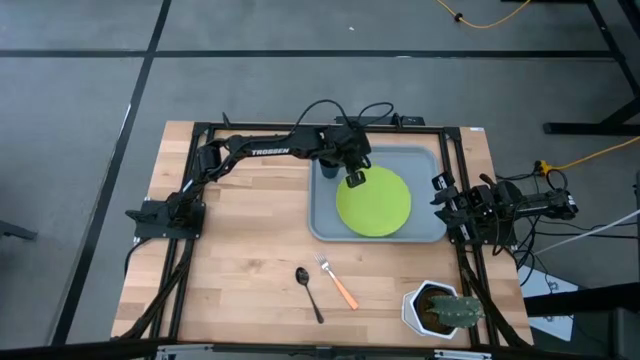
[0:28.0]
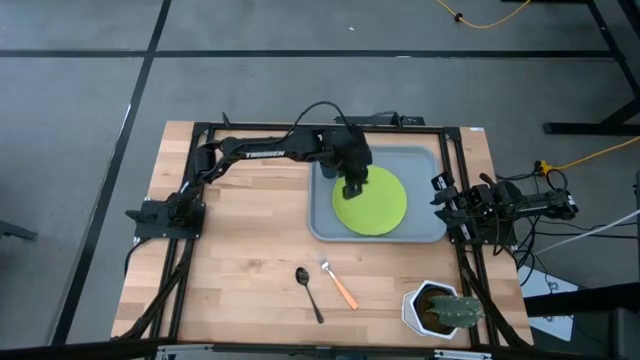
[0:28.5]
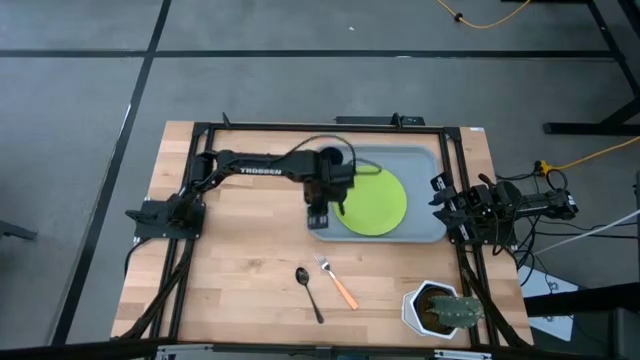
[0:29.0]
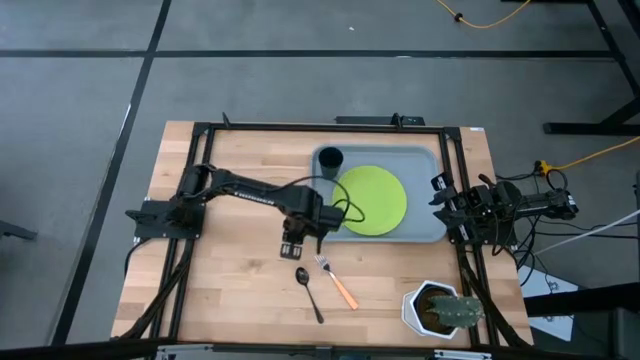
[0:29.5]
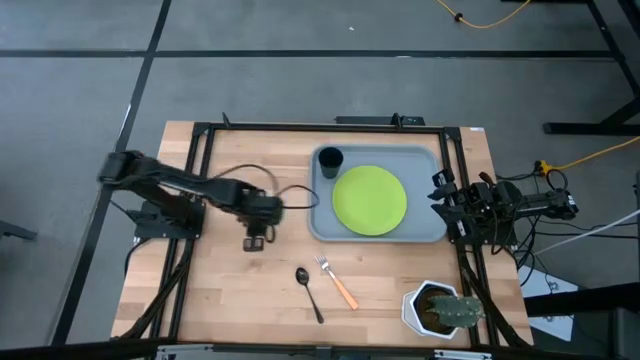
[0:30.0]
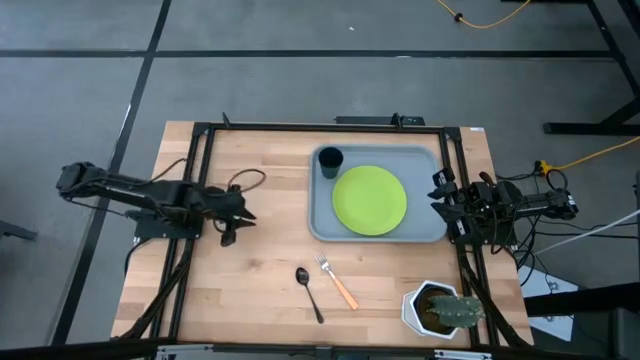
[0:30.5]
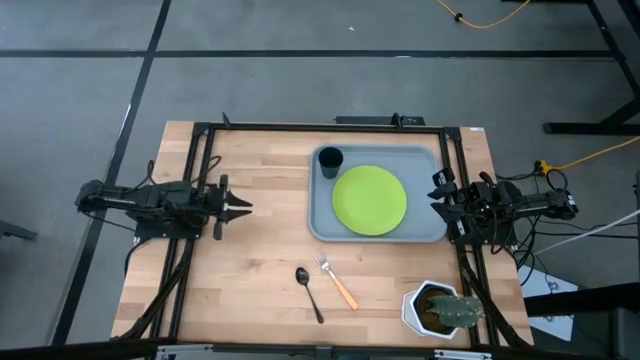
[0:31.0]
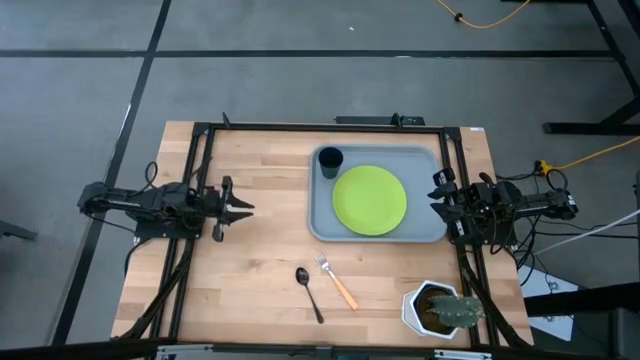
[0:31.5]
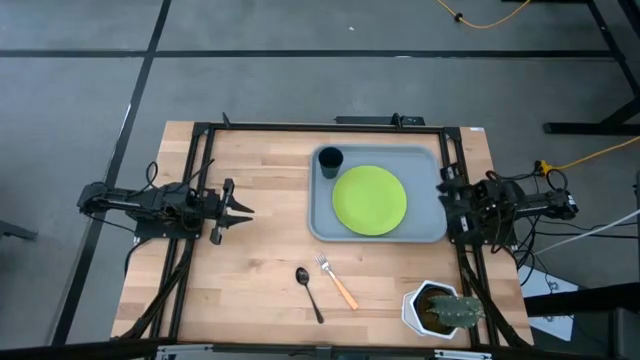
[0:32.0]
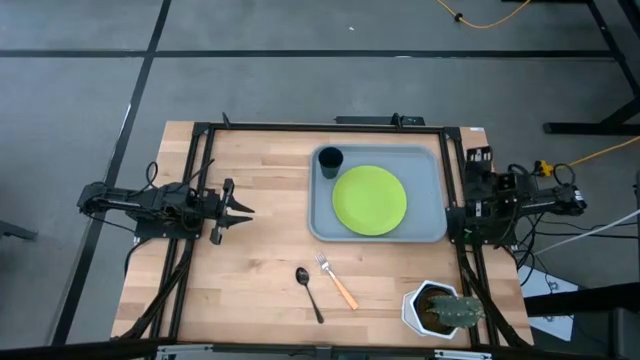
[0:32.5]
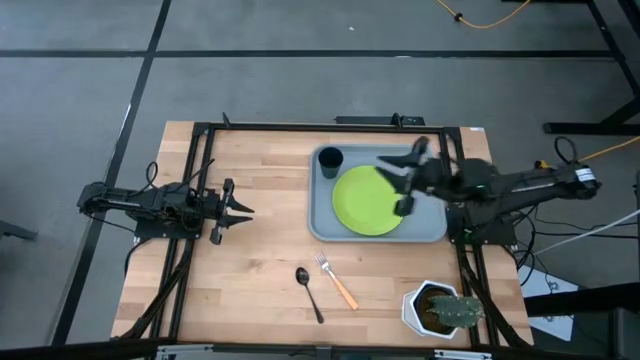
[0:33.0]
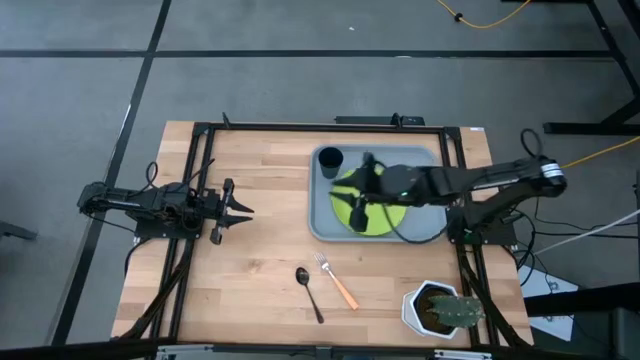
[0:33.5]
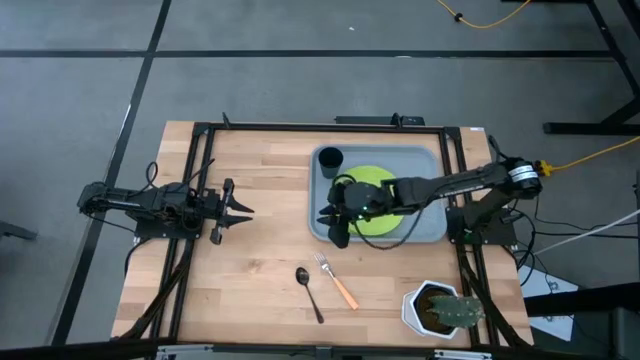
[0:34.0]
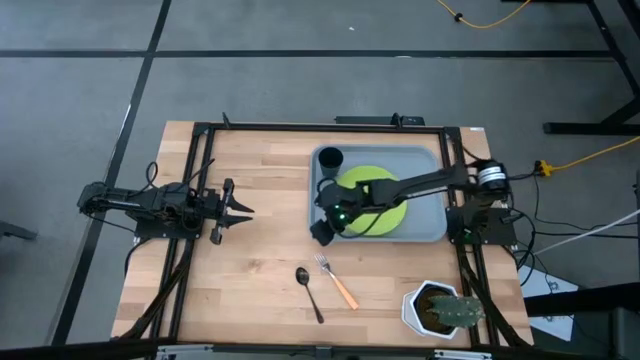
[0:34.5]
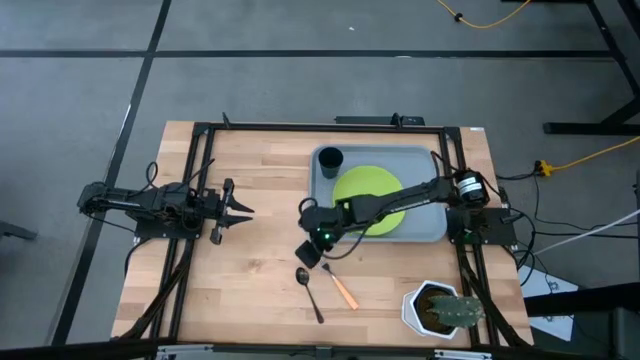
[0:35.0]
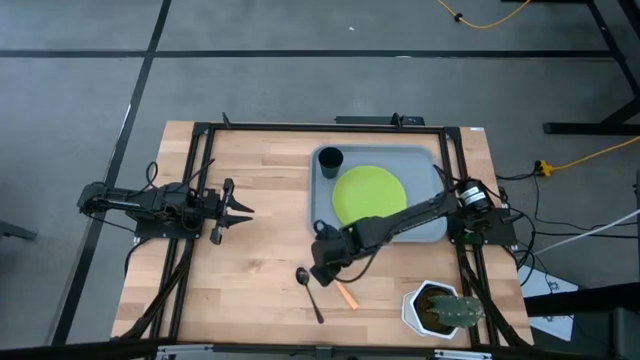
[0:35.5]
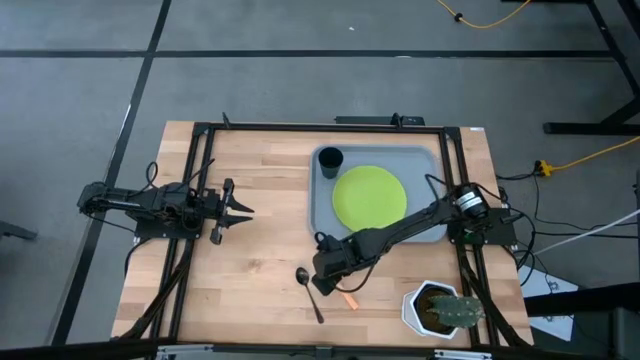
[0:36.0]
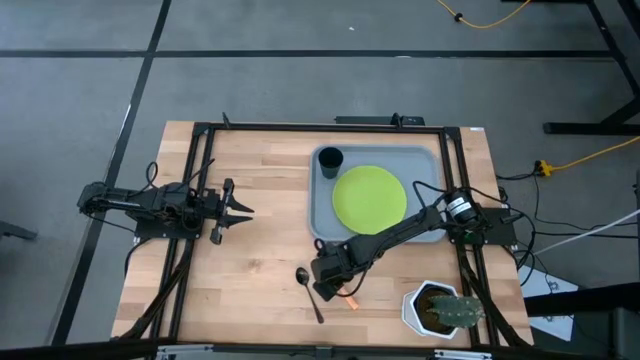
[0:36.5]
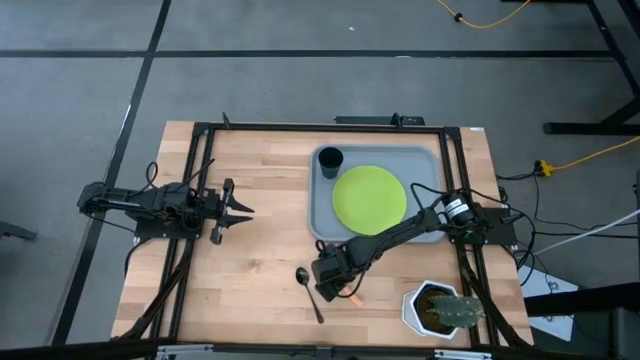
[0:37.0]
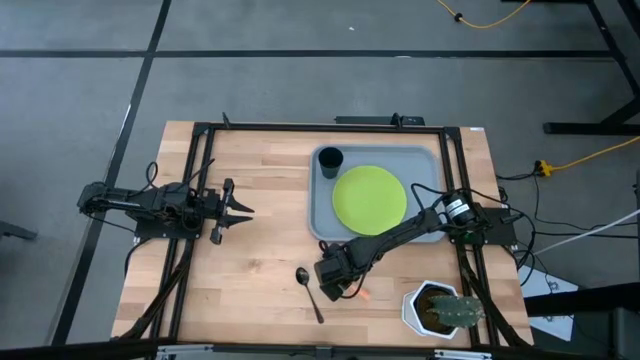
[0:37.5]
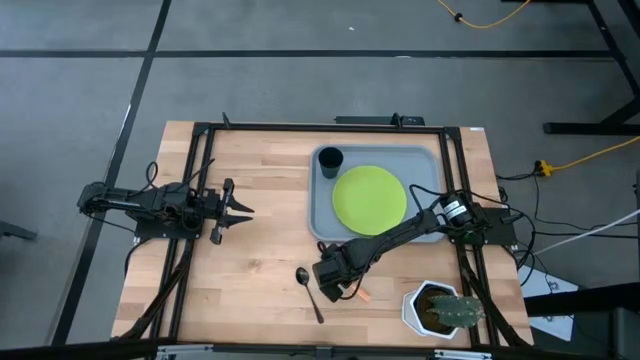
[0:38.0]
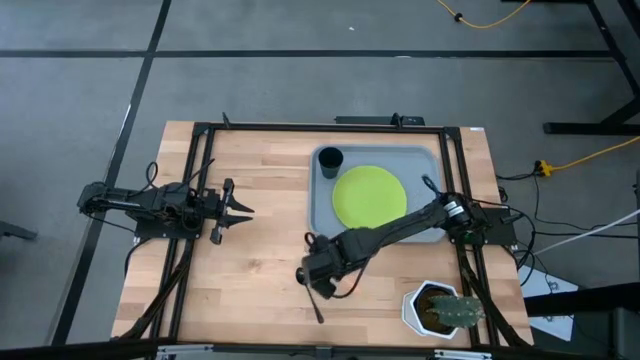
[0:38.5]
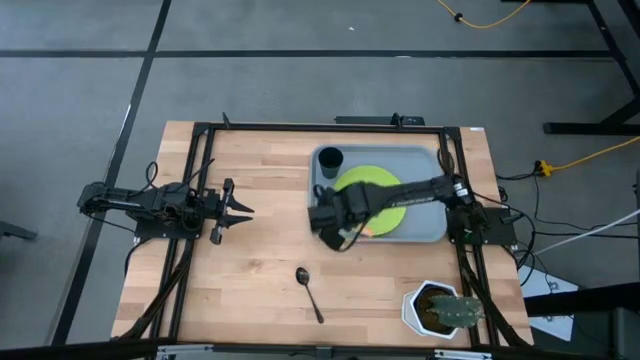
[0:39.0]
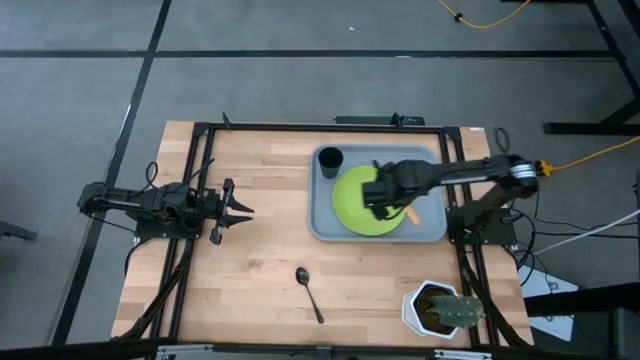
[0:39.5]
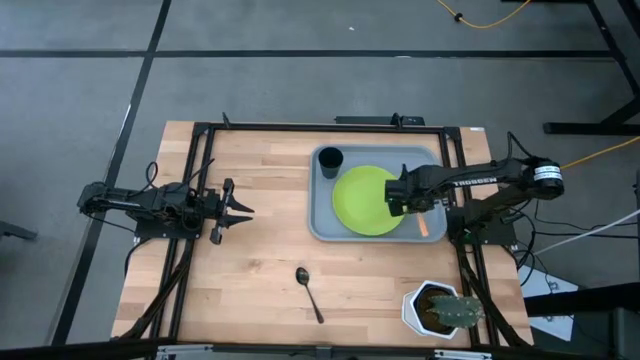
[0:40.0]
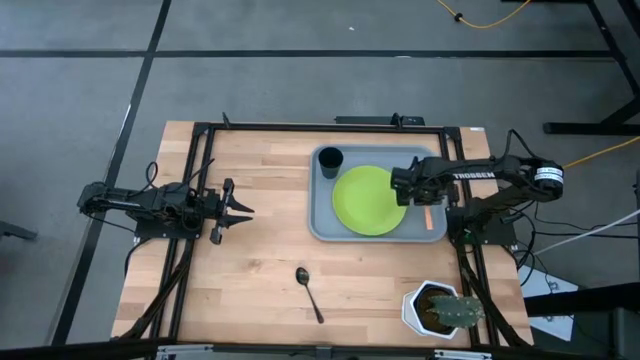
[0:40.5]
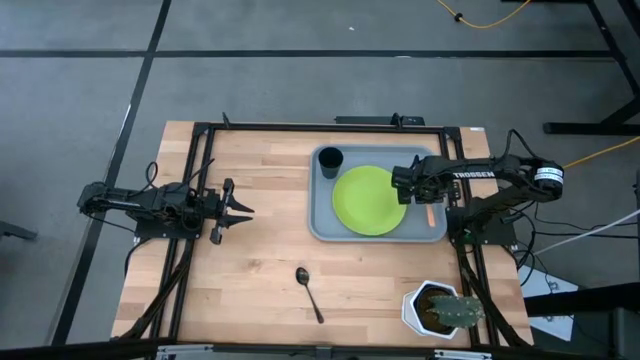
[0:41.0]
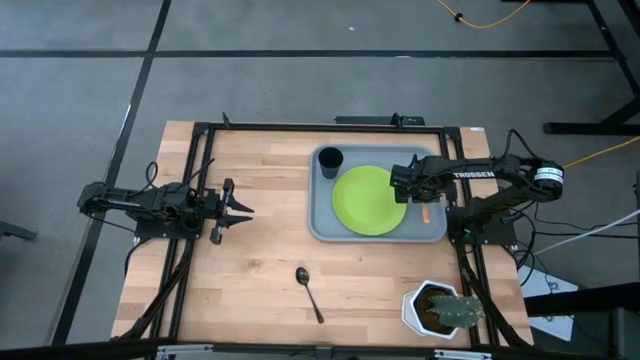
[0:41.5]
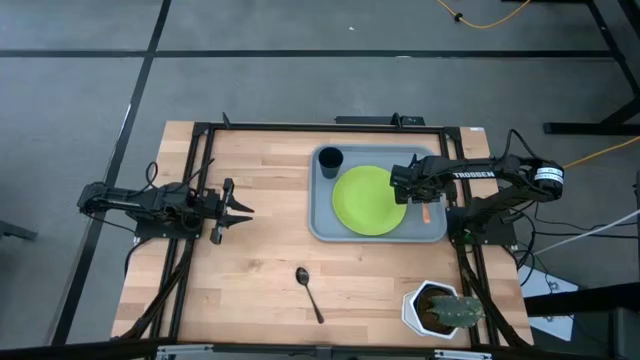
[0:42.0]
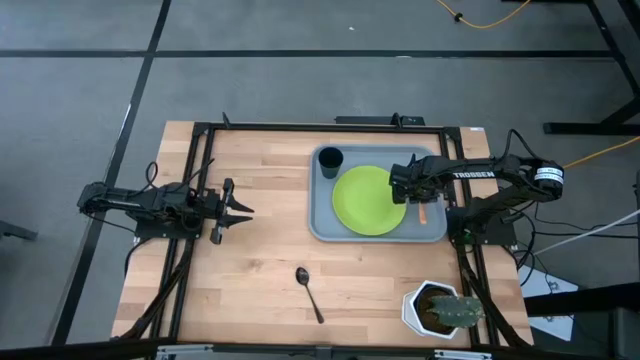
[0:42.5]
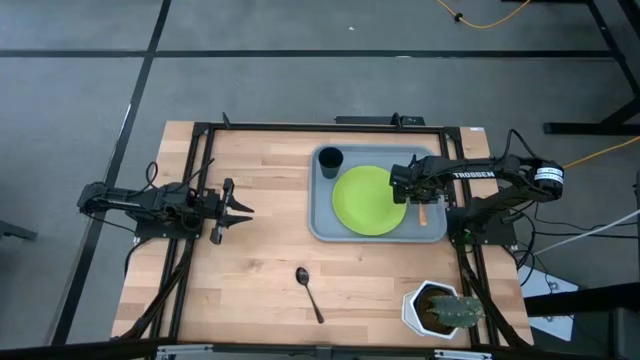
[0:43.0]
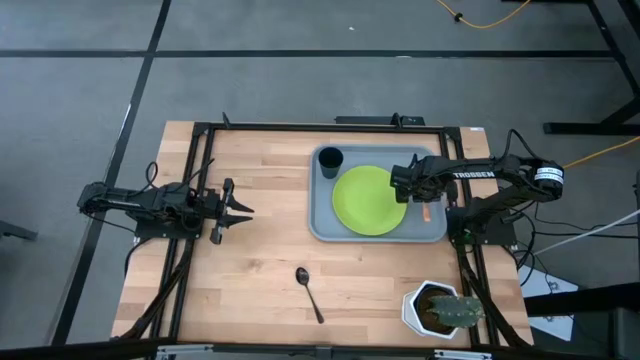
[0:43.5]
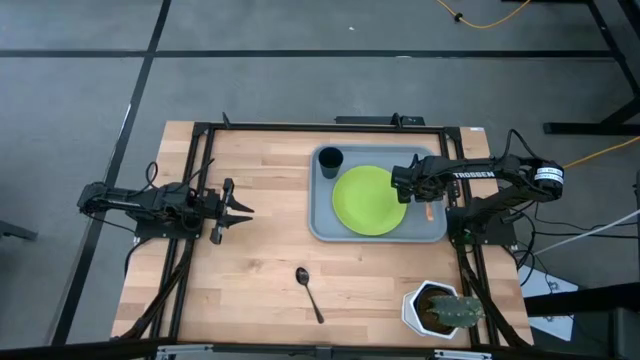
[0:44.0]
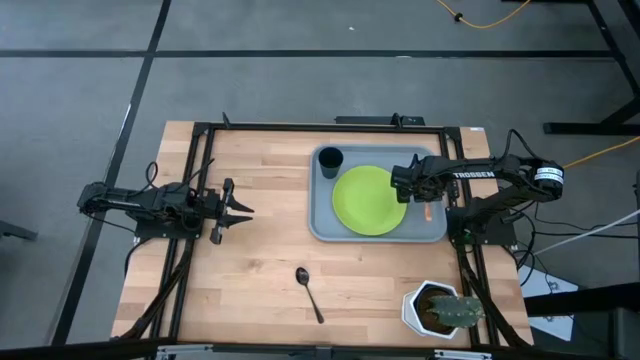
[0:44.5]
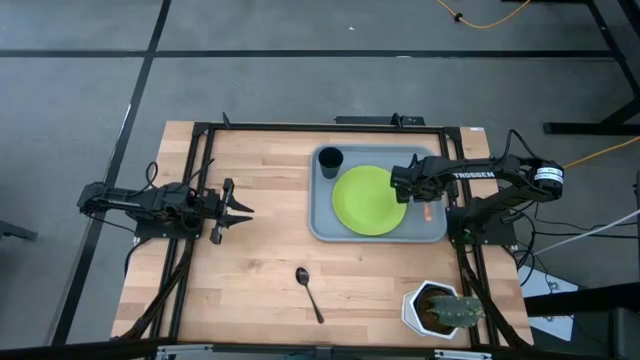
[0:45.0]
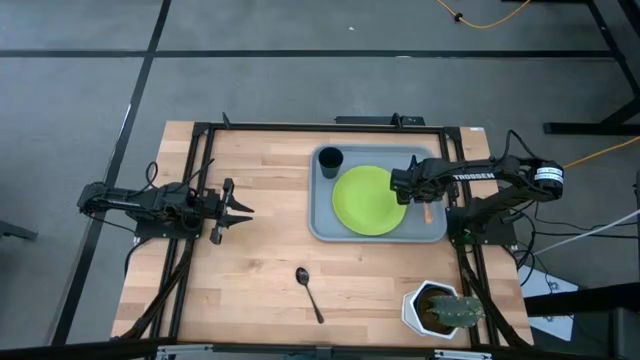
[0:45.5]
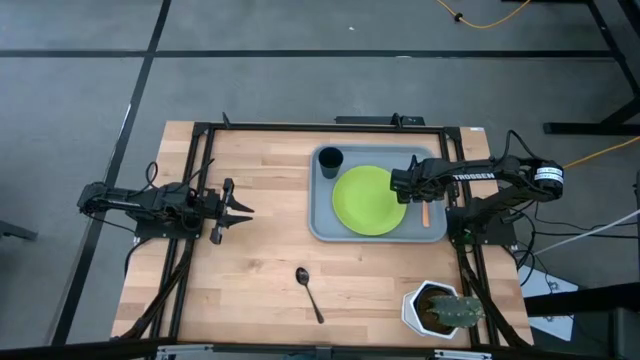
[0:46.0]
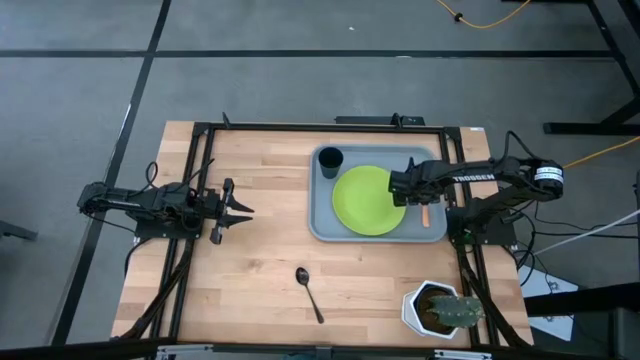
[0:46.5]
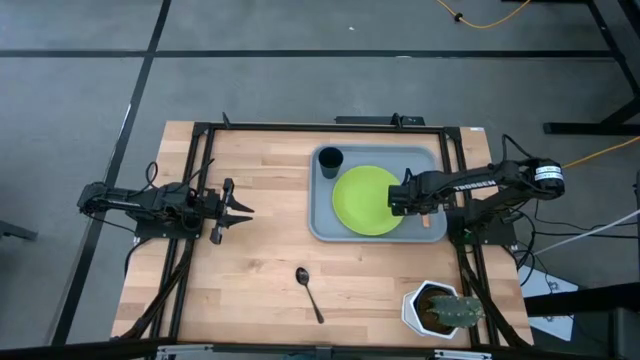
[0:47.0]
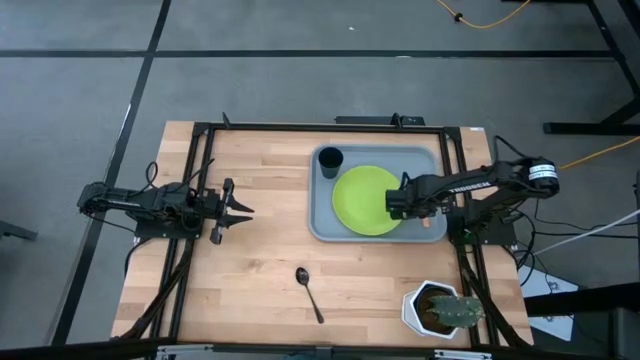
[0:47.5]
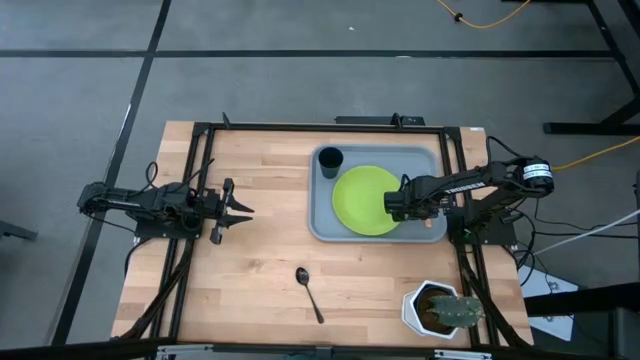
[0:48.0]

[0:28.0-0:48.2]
Task: Pick and place plate/cup/fork/spoon on tray
Put the brown fork on the gray serving tray to the right of the light green plate

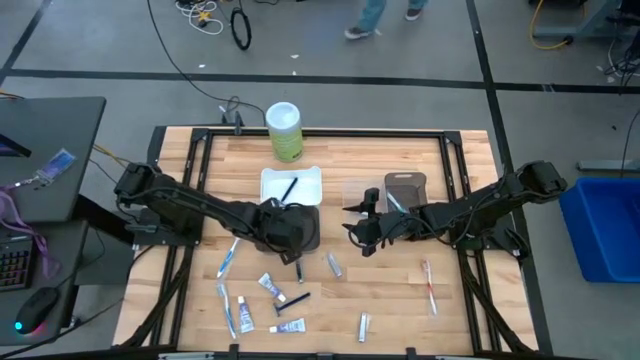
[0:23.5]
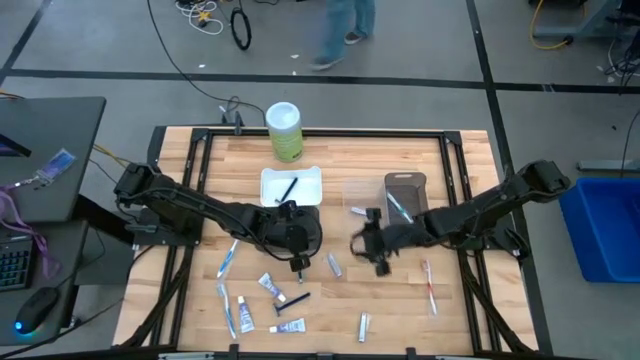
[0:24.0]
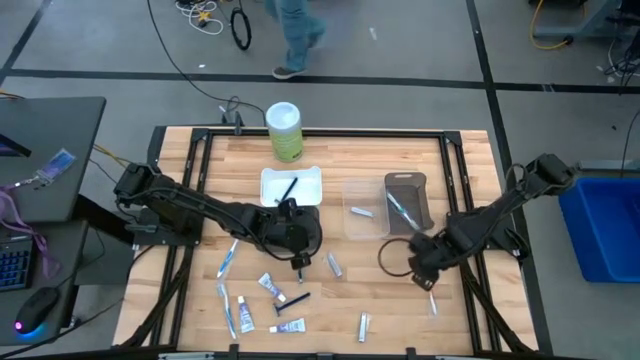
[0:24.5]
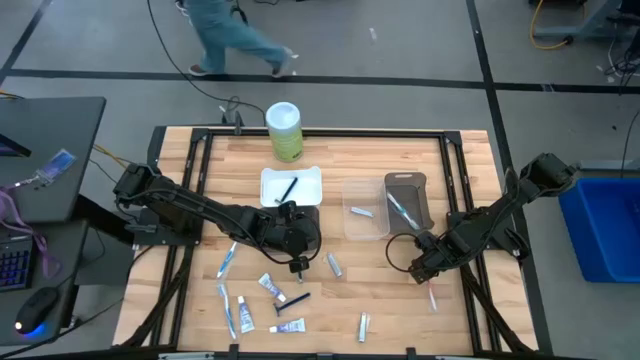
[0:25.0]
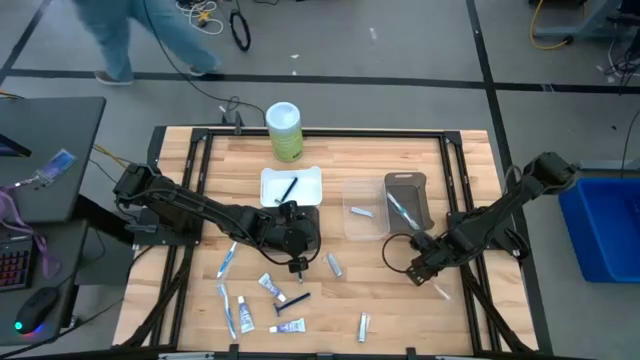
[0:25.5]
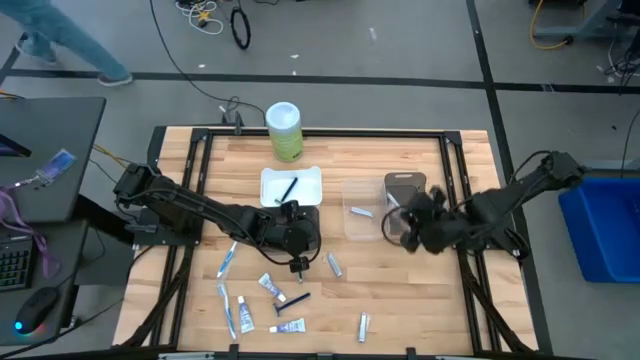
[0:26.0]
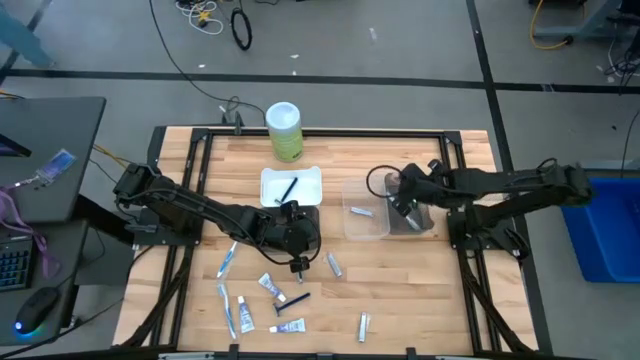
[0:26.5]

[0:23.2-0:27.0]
Task: Pick & Place Travel size toiletries
Put the orange toothbrush into the right black bin
